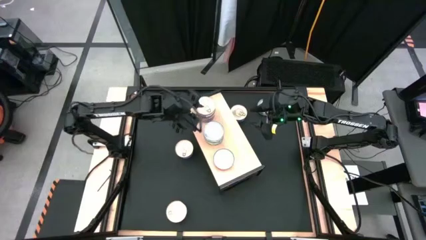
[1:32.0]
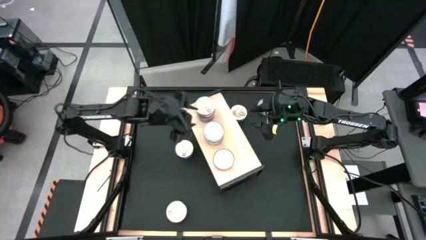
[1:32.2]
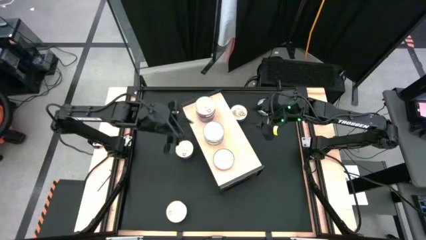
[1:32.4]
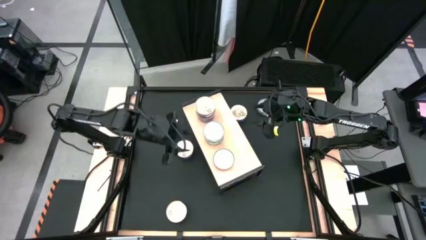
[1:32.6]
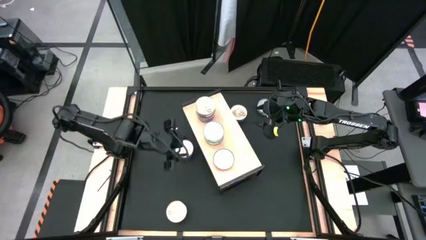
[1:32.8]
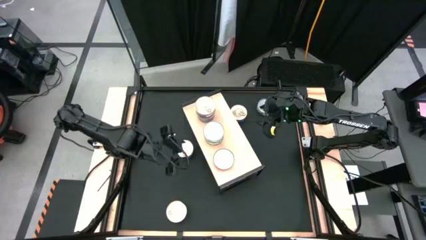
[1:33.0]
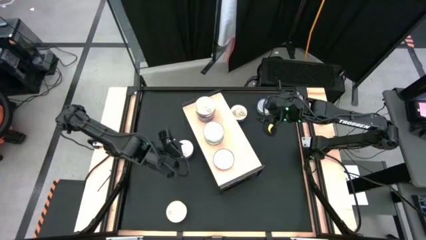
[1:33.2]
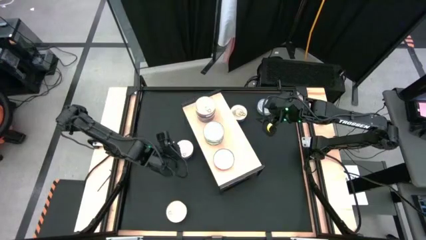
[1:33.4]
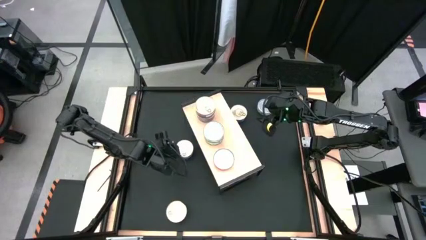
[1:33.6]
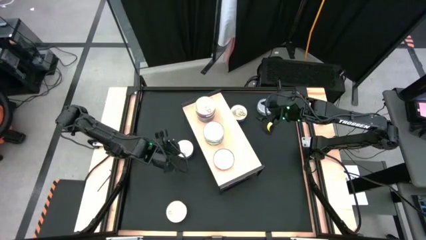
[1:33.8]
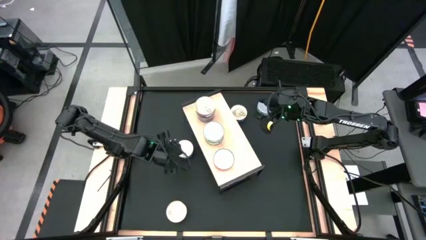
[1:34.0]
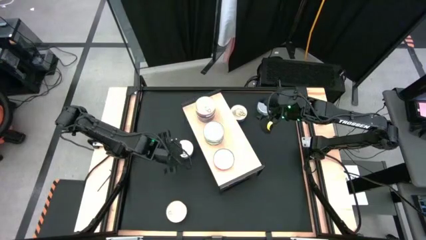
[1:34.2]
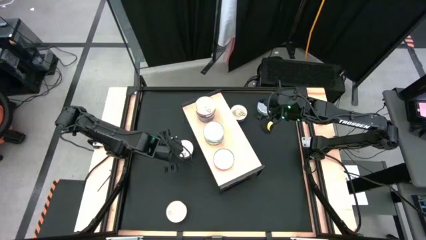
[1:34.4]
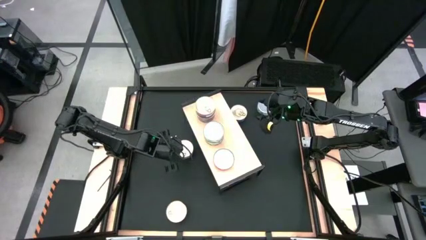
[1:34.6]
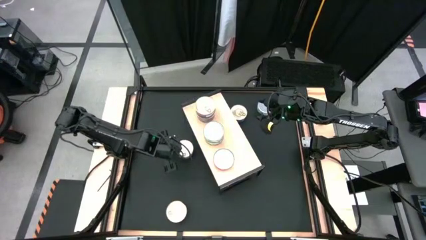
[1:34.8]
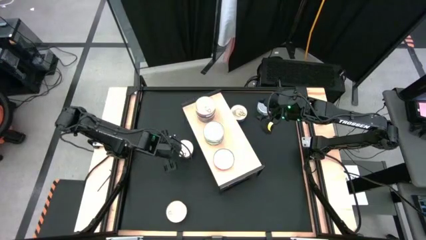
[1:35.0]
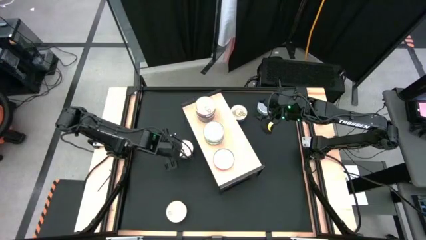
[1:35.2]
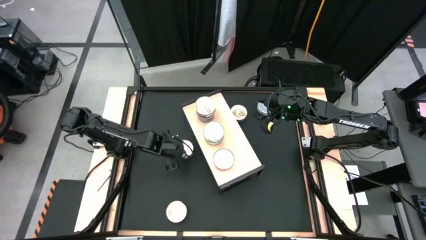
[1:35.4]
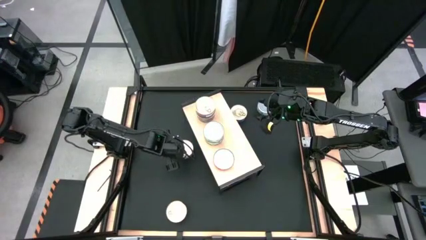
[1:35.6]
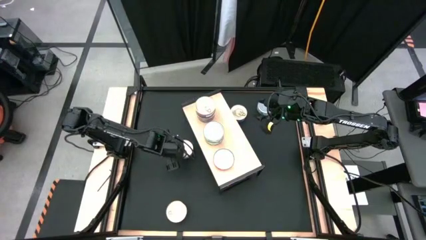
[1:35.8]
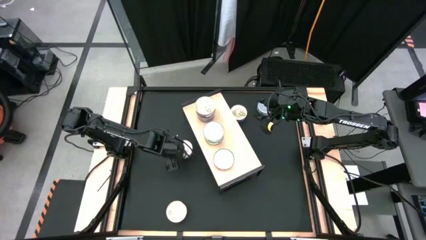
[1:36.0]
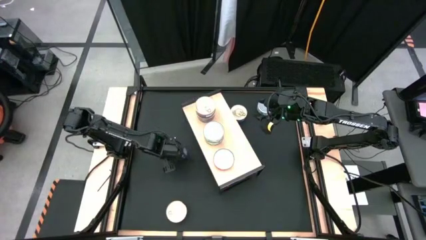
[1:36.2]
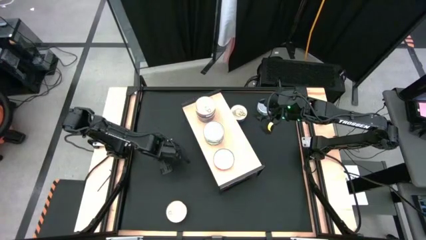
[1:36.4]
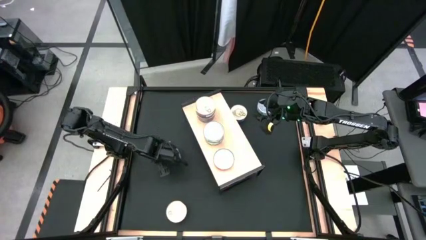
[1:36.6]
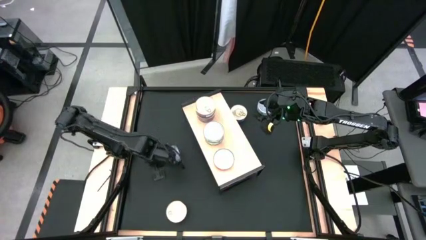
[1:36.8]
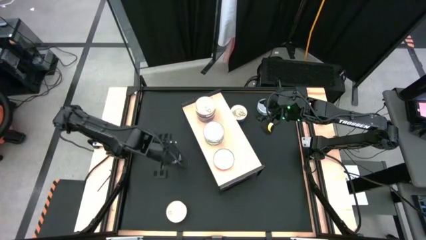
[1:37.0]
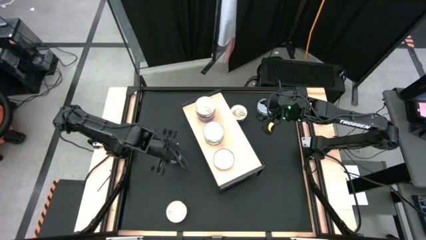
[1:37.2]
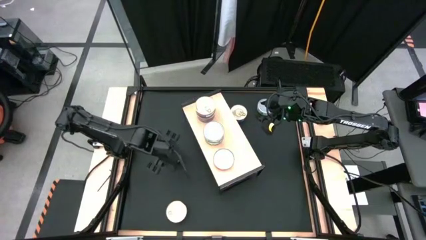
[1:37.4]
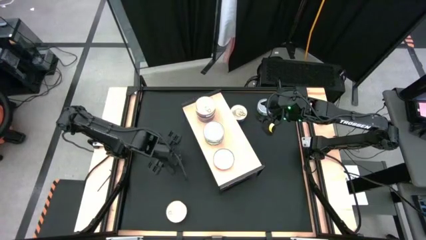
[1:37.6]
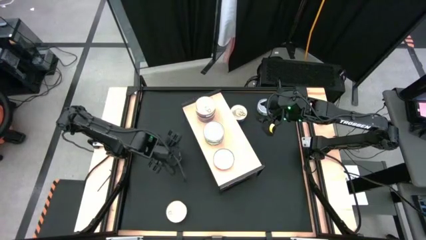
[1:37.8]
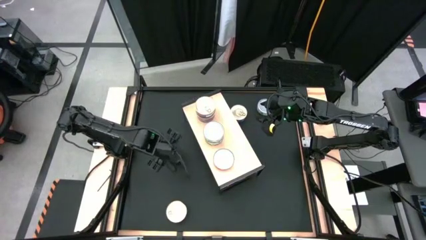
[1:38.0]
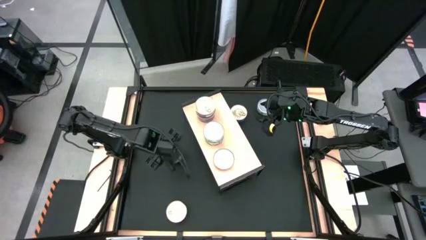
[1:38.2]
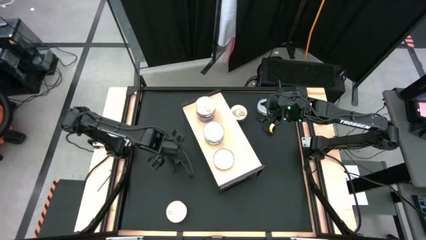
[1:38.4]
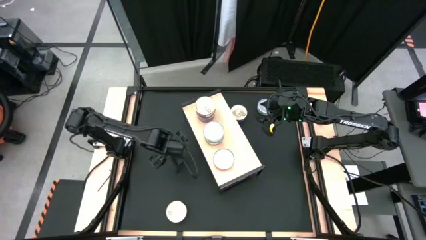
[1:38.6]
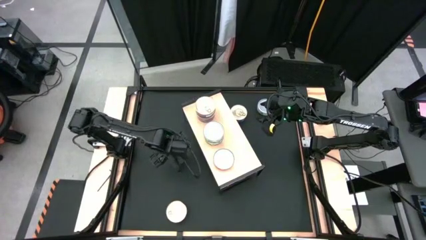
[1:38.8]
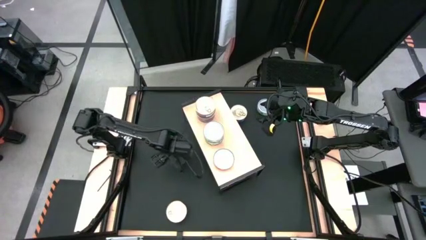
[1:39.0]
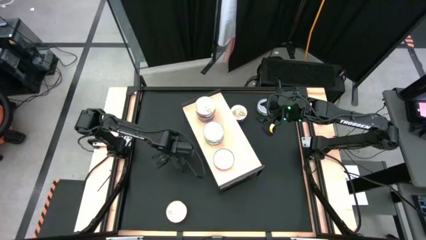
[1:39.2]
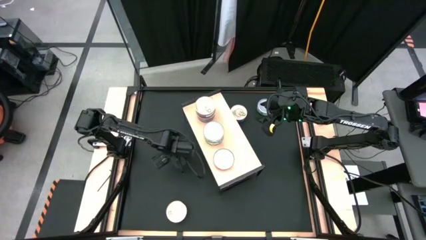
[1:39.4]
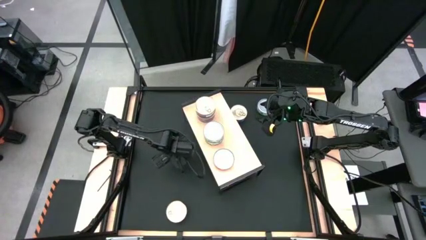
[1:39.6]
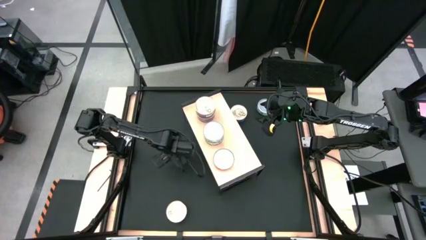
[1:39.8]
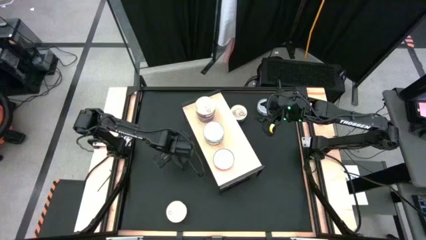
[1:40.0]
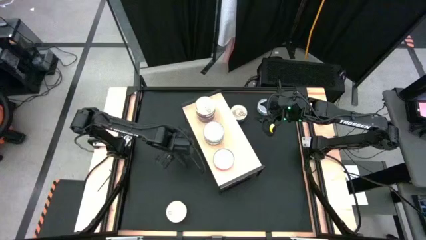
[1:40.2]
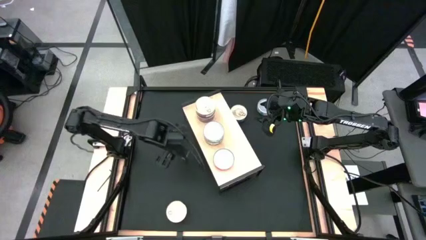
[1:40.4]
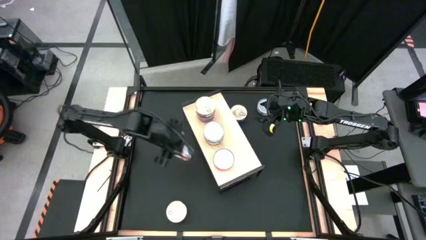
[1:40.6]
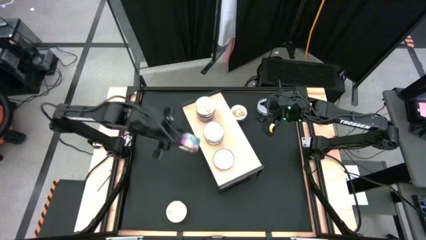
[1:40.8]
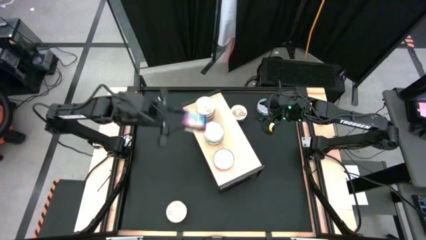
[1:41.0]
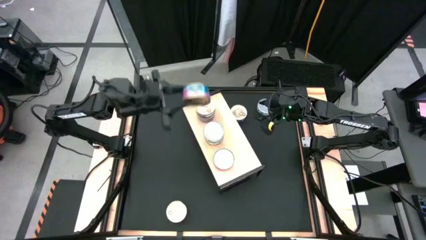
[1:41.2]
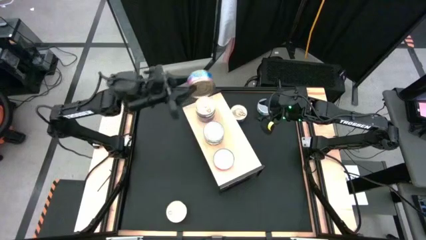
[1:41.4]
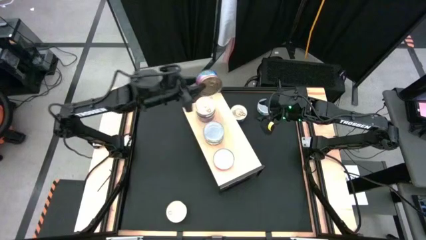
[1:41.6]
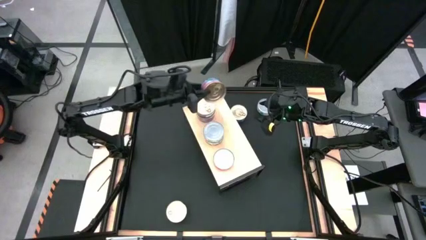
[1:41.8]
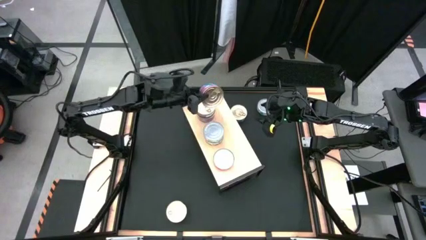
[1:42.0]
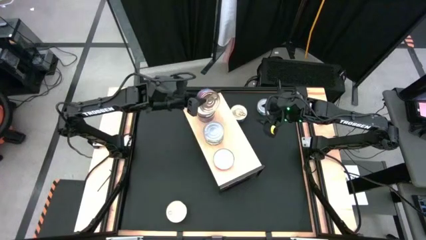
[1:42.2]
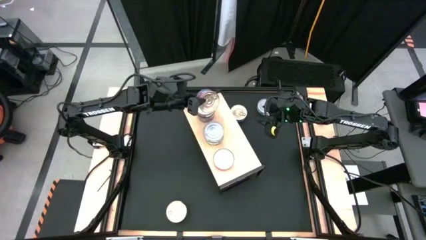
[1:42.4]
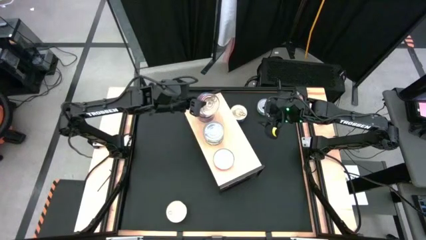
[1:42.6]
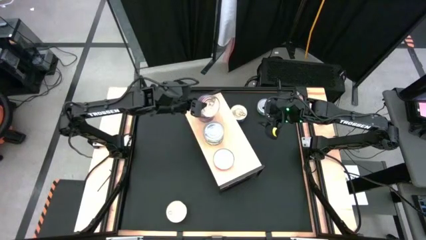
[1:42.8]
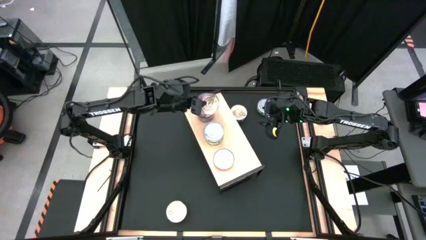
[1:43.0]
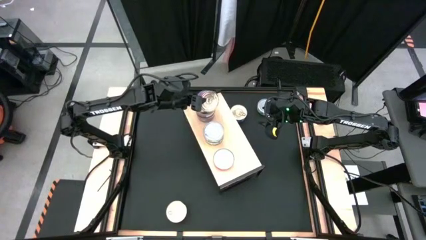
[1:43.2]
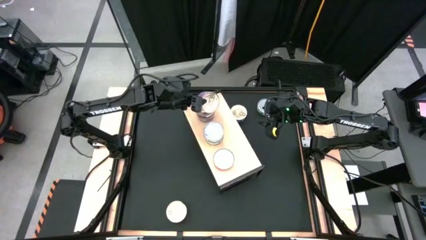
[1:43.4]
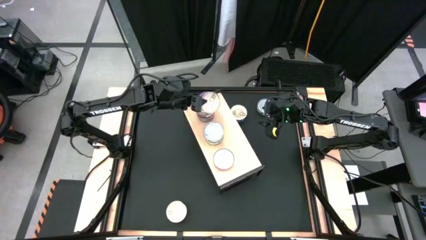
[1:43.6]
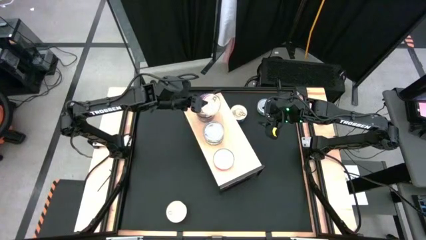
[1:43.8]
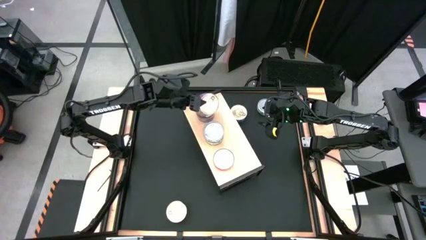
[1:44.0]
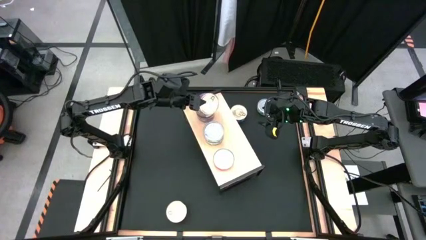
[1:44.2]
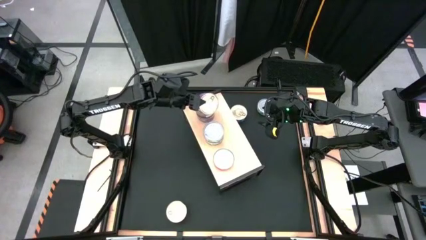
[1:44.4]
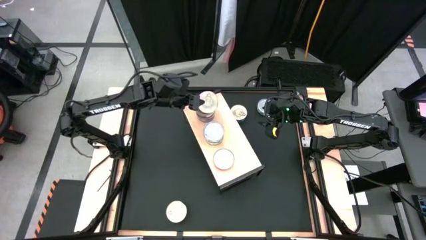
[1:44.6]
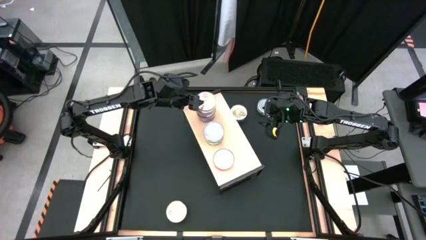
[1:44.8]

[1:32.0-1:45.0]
Task: Stack canned seafood by type on shelf
Stack the blue pink tuna can on top of the blue pink tuna cans on the shelf

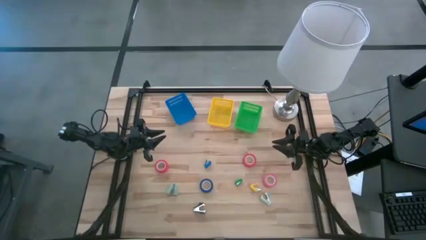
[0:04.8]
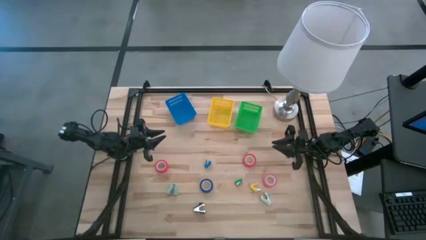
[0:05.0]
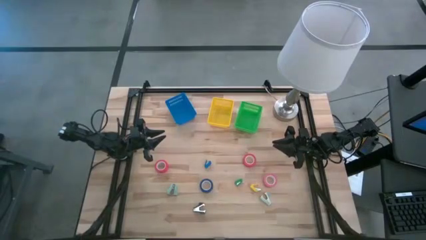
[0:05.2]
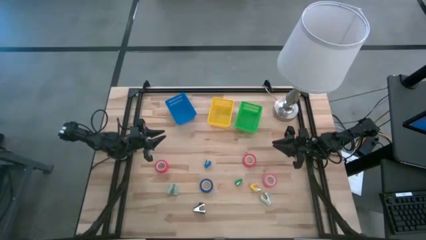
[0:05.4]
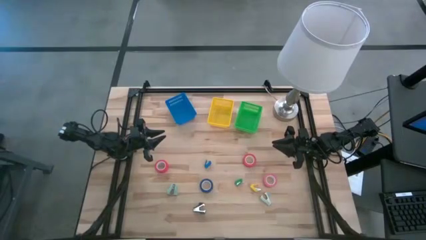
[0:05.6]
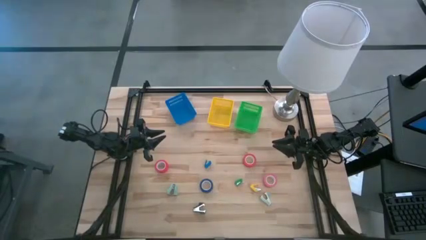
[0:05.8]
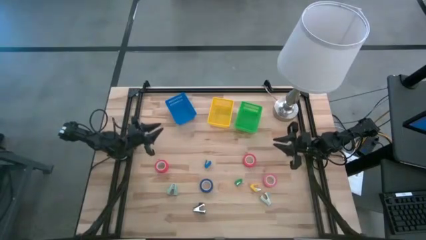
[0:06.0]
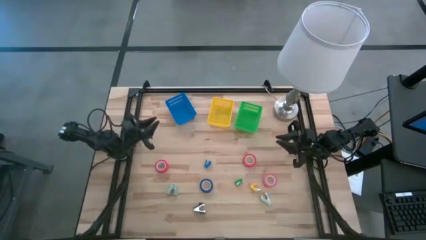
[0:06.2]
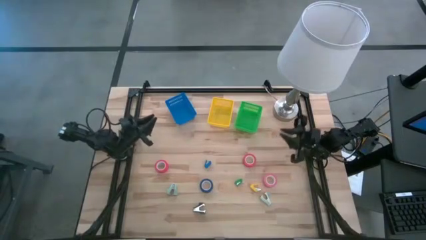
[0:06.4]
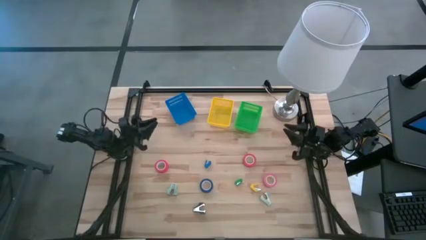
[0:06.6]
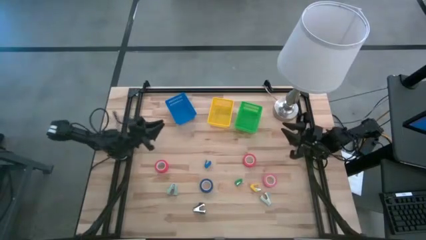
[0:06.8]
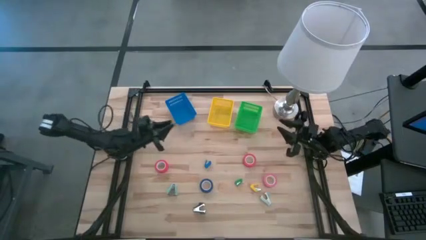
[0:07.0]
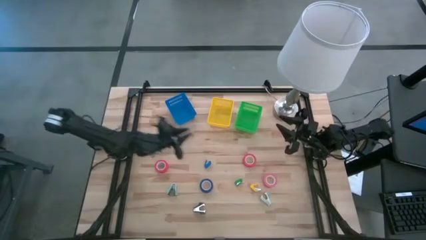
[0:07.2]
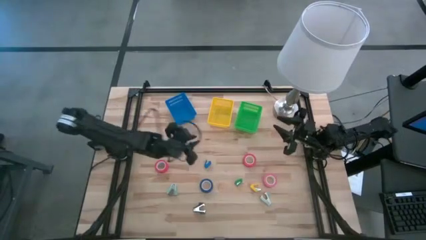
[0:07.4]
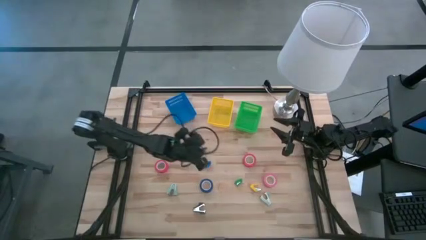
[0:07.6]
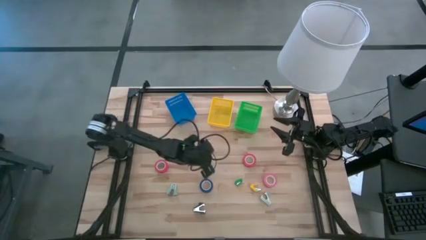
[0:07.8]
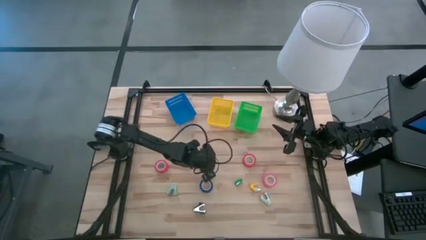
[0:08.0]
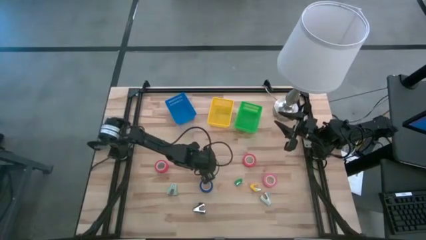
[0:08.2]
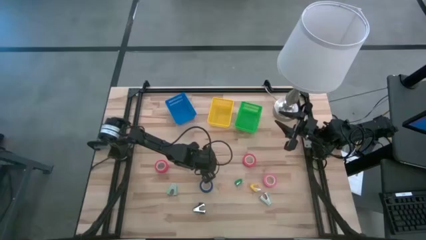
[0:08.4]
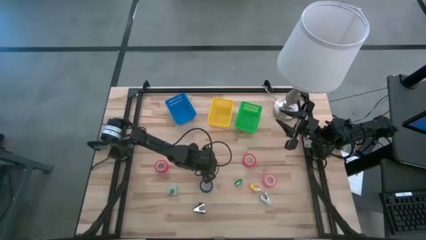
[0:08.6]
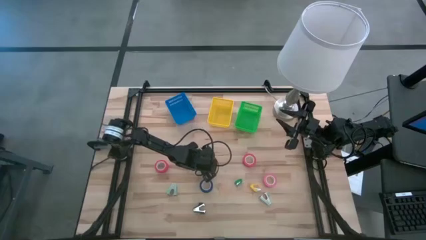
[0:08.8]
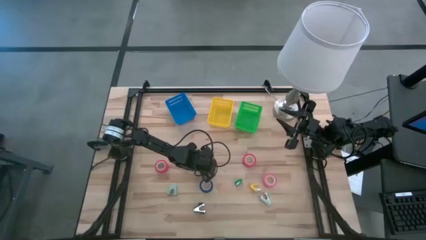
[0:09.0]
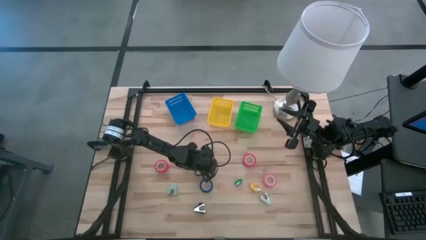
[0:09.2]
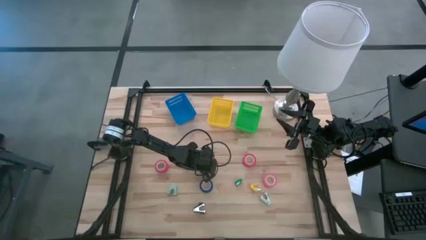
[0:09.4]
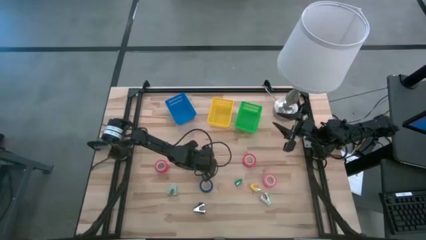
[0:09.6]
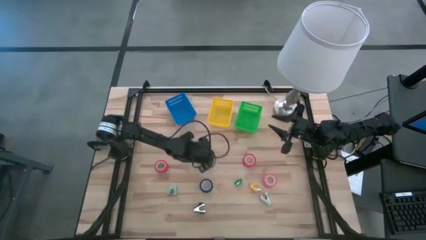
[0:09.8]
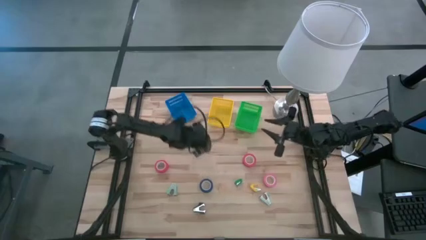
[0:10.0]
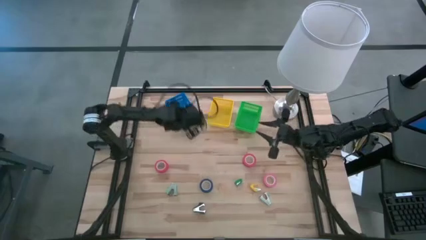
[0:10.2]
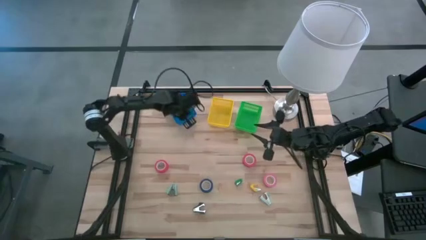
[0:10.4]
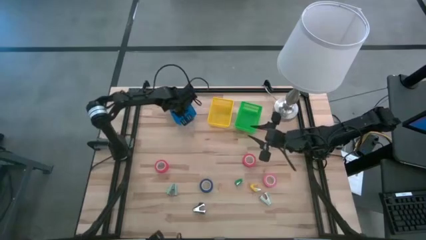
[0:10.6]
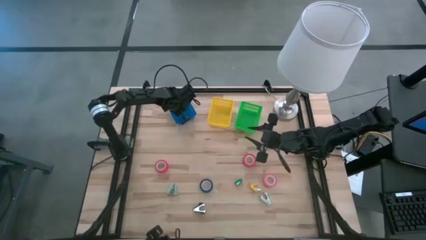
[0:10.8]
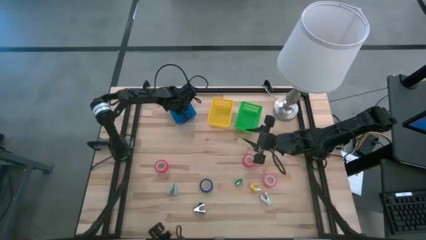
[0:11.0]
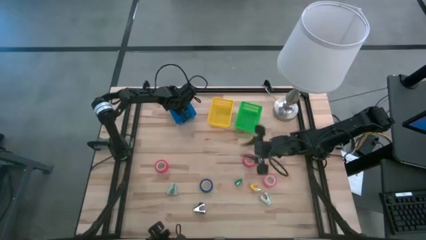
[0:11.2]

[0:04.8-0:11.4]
Task: Pick and place Stapler, Stapler remover, tape
Put the blue stapler into the blue bin
